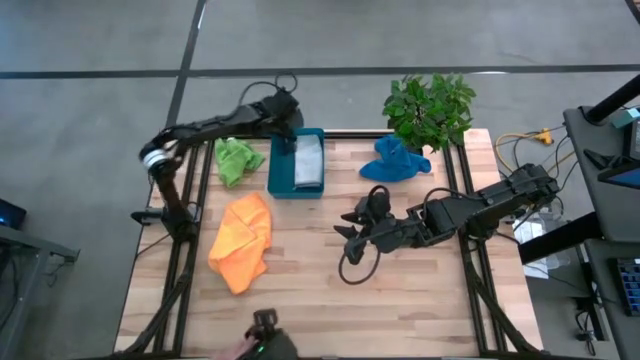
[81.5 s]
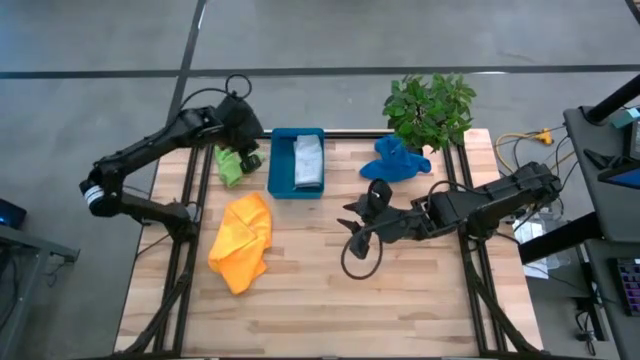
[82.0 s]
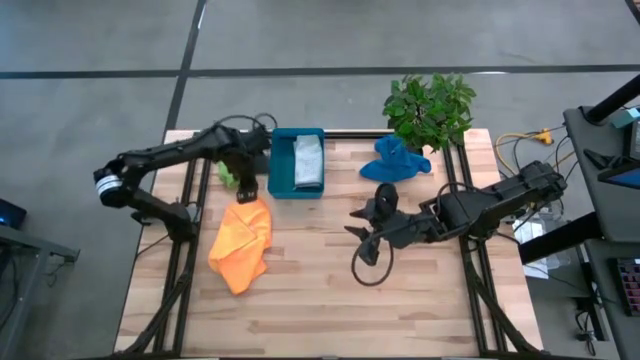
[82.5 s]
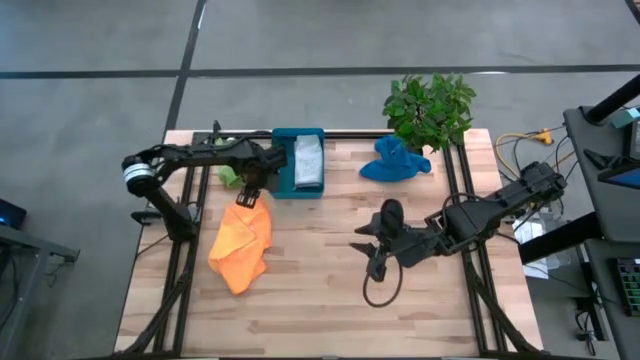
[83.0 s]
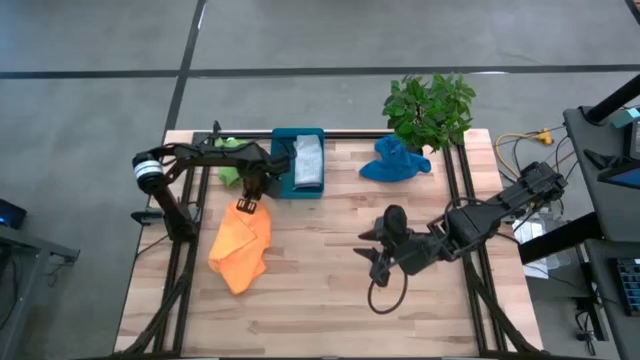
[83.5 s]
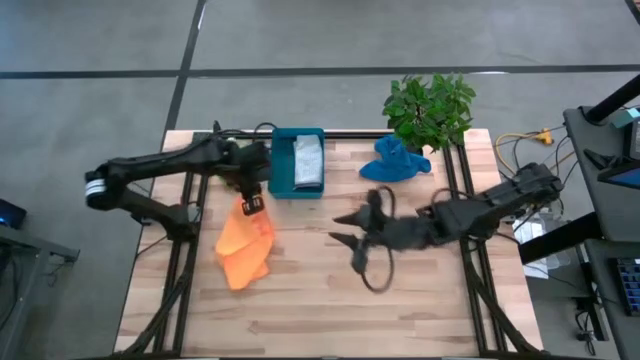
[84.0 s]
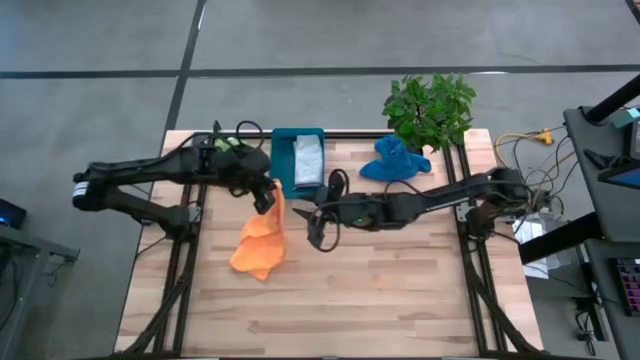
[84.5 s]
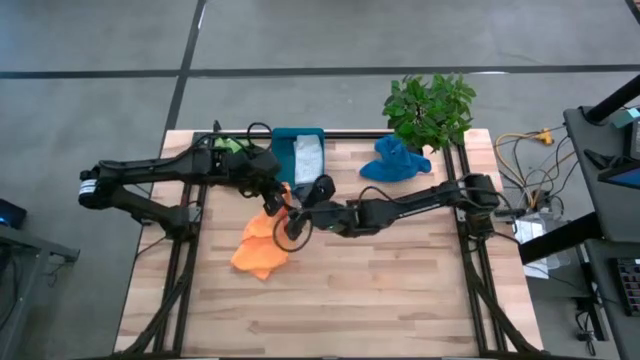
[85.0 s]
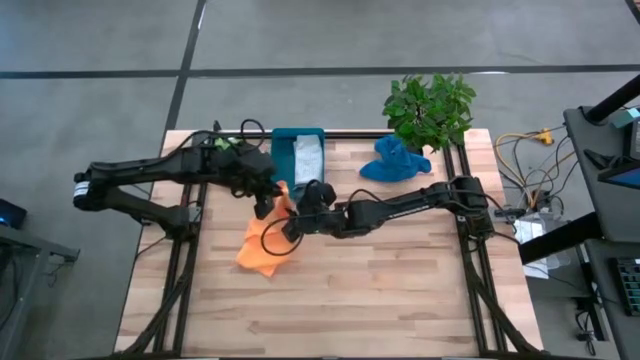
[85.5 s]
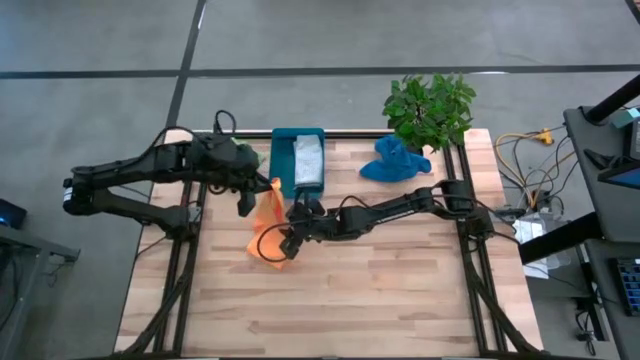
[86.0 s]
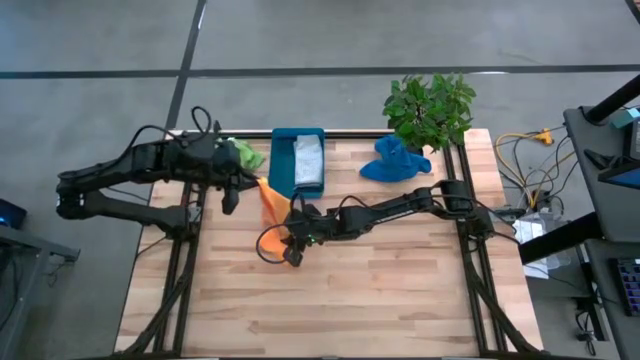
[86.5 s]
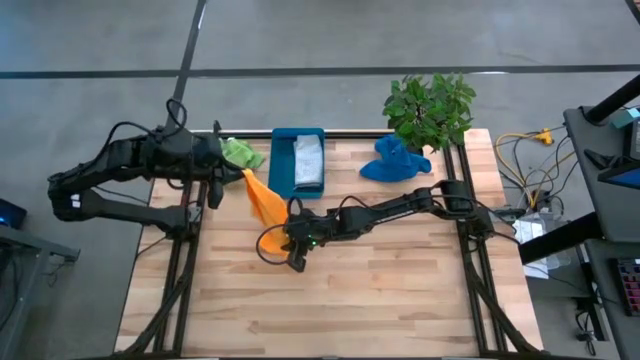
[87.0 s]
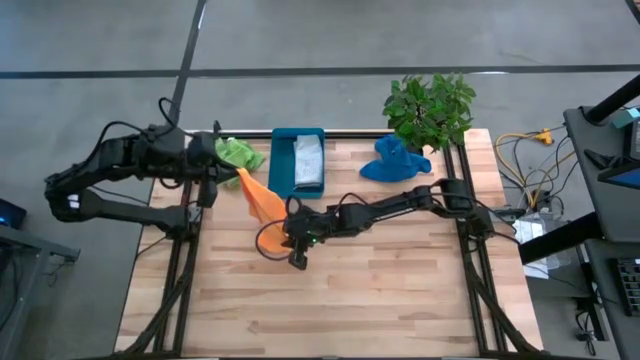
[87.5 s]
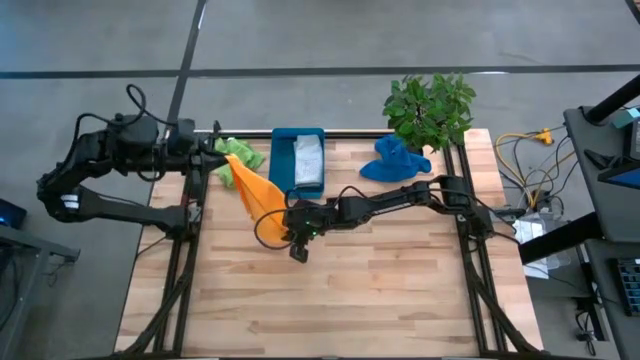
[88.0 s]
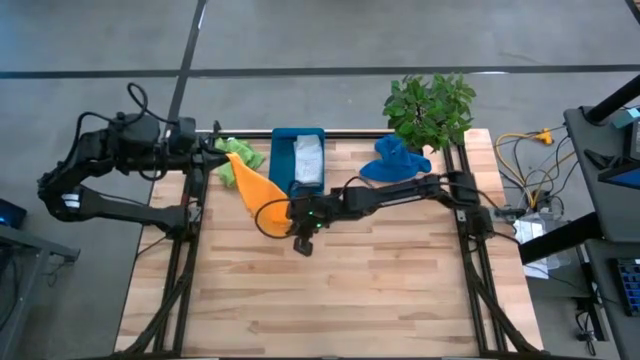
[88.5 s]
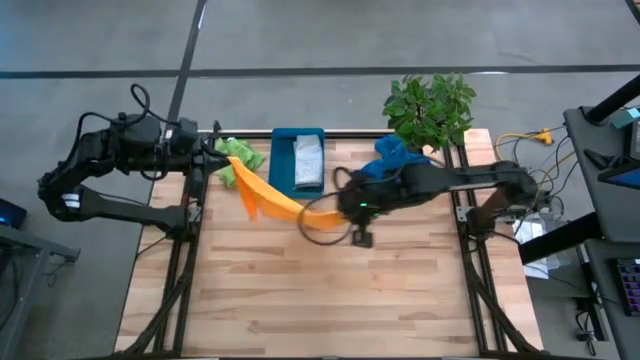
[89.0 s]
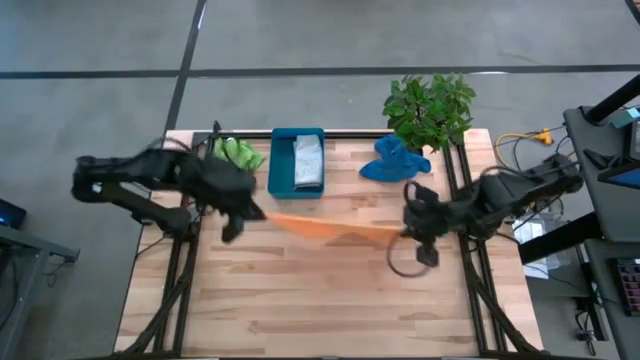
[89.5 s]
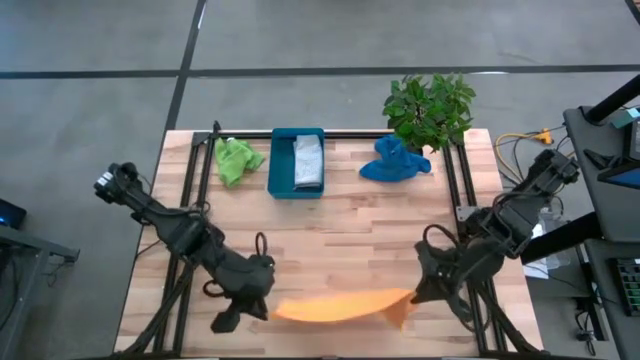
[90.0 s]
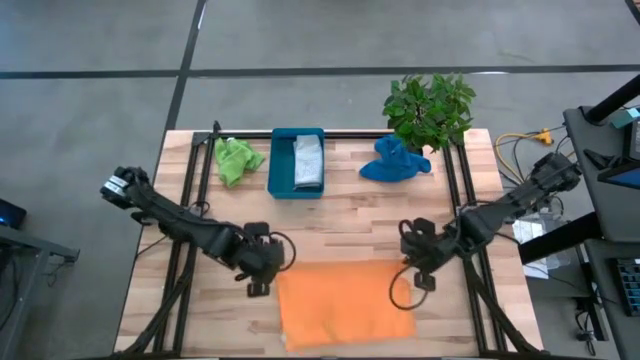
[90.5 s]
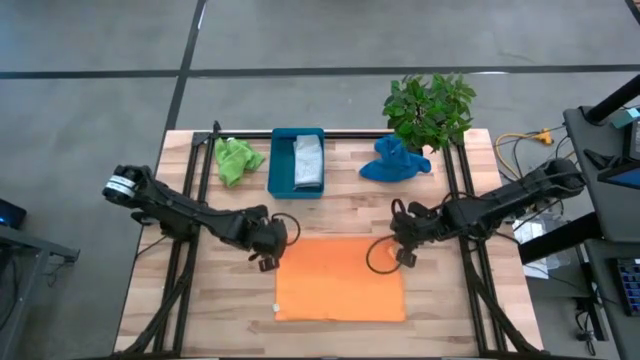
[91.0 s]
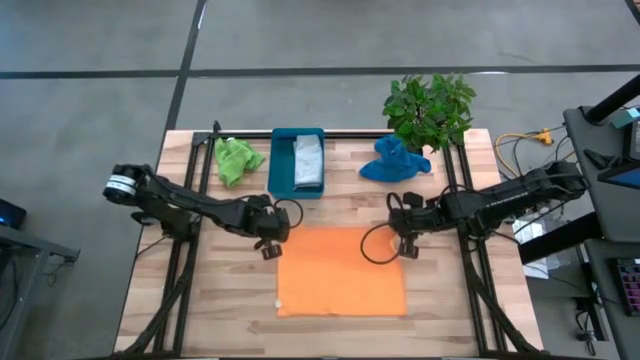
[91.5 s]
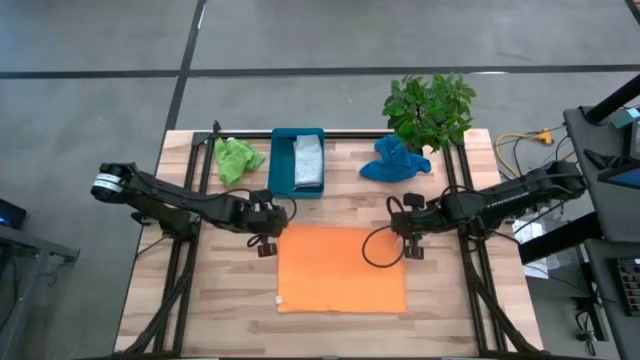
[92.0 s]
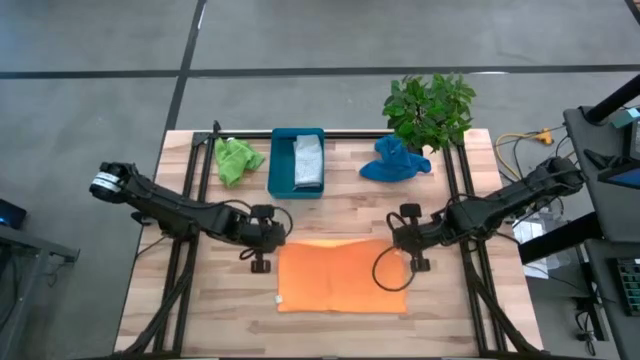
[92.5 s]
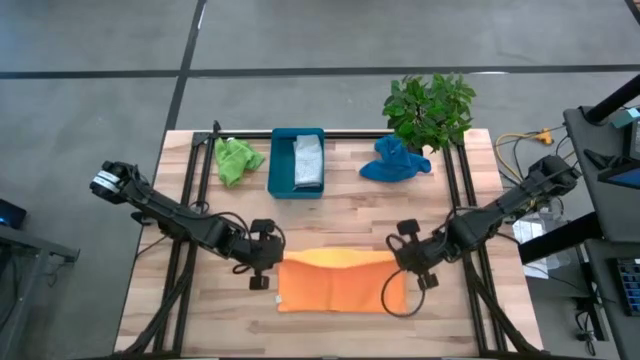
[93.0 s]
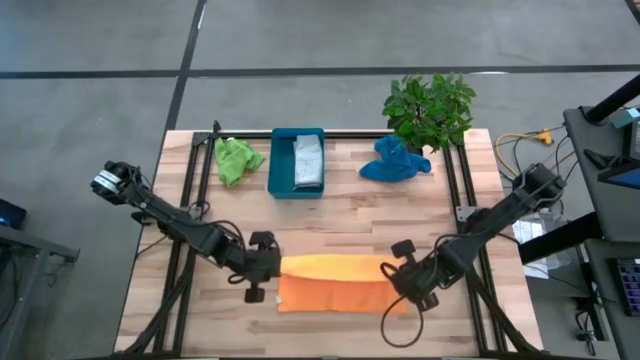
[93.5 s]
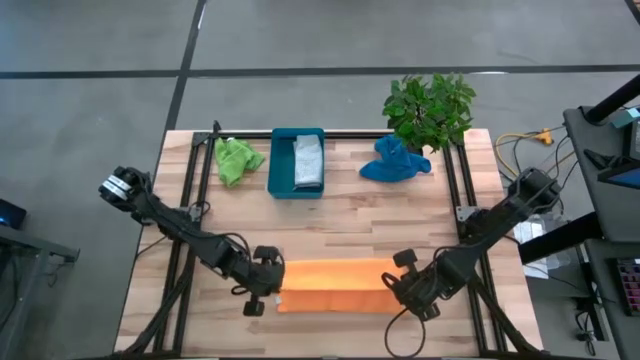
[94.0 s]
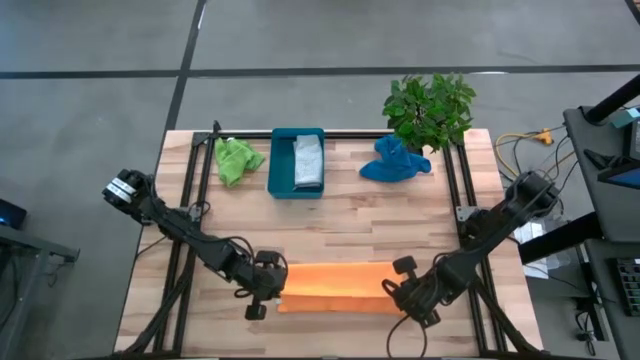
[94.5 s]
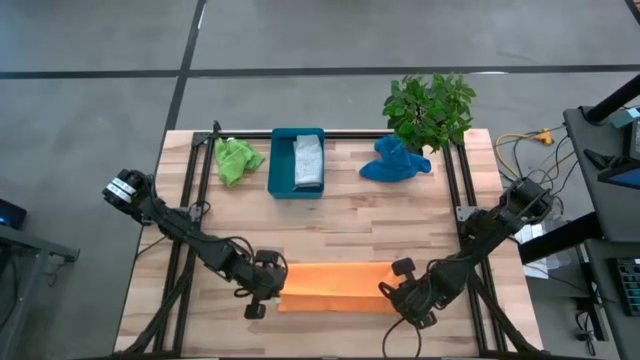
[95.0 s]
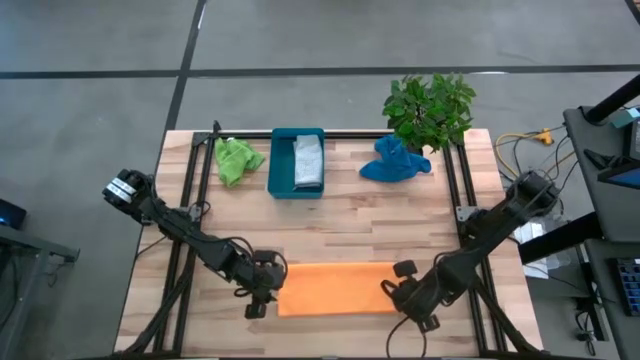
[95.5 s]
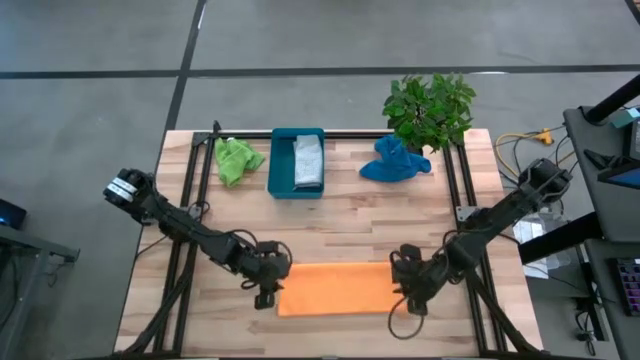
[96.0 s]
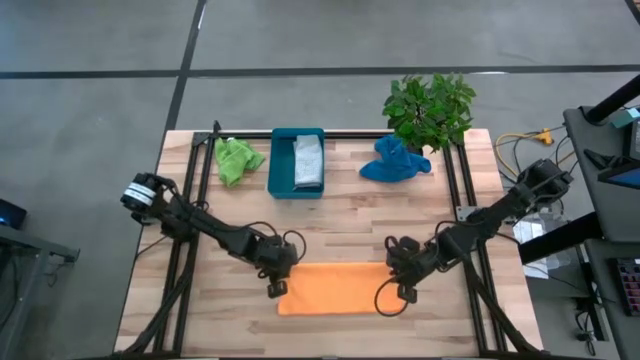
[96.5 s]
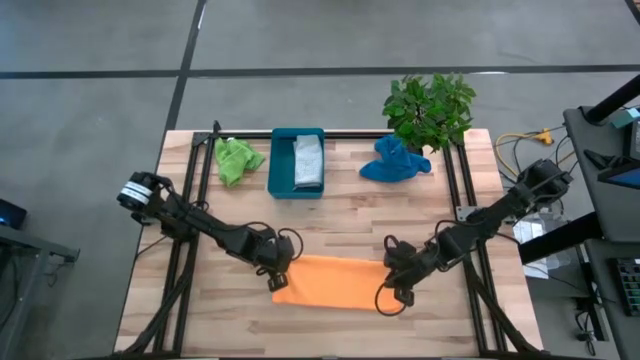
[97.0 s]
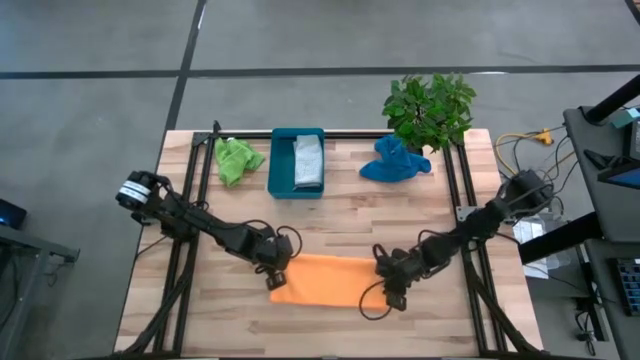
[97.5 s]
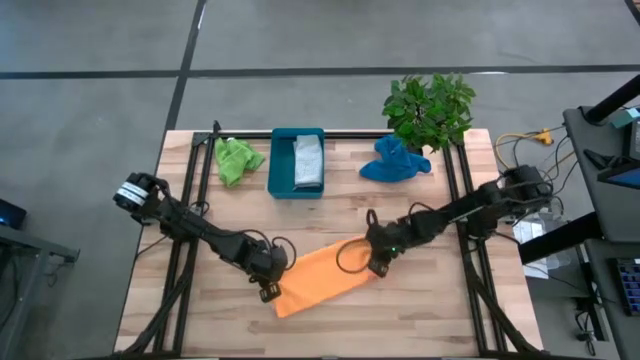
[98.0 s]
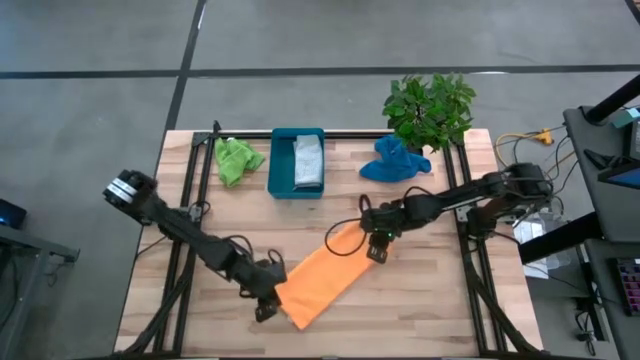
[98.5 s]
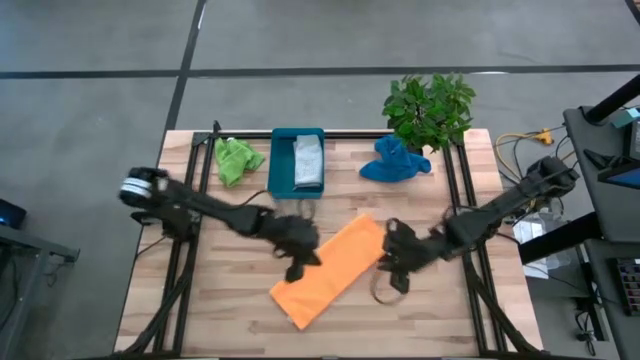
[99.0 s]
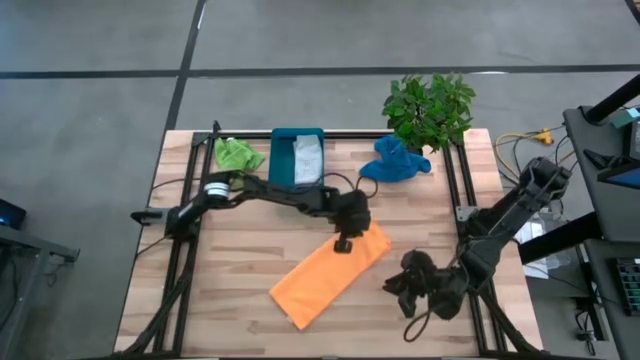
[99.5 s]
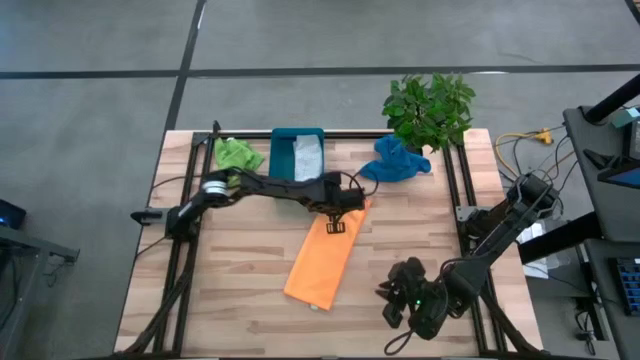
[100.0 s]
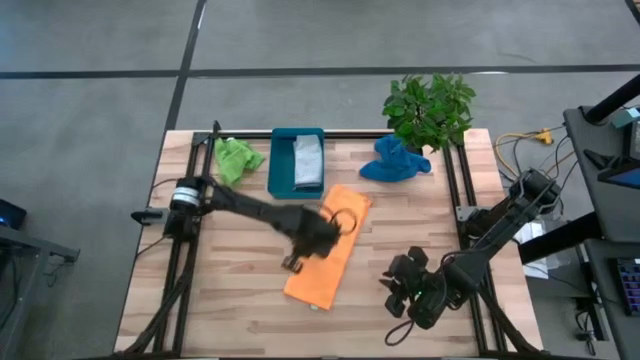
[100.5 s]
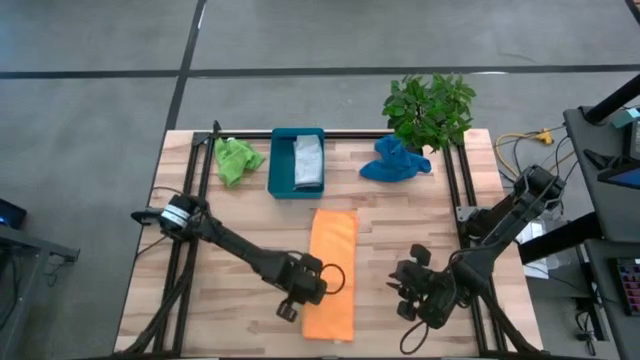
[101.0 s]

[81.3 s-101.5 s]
Task: Fold microfiber towels
Fold the orange microfiber cloth

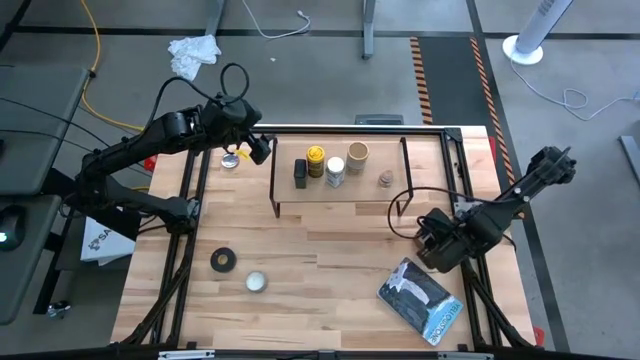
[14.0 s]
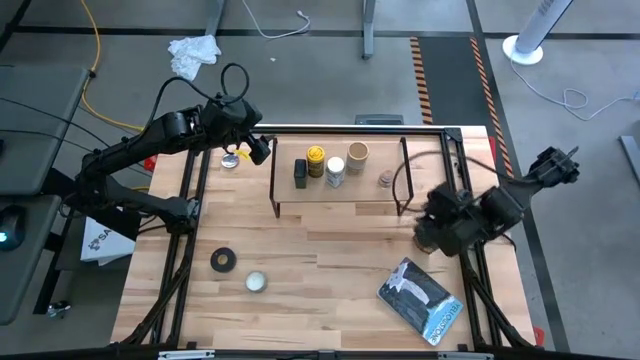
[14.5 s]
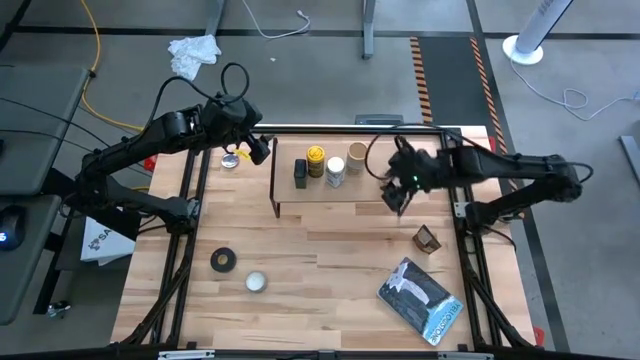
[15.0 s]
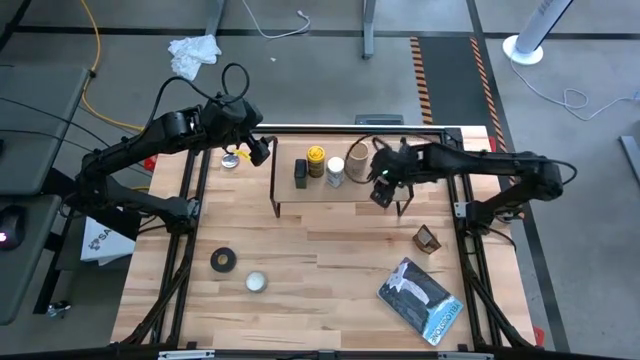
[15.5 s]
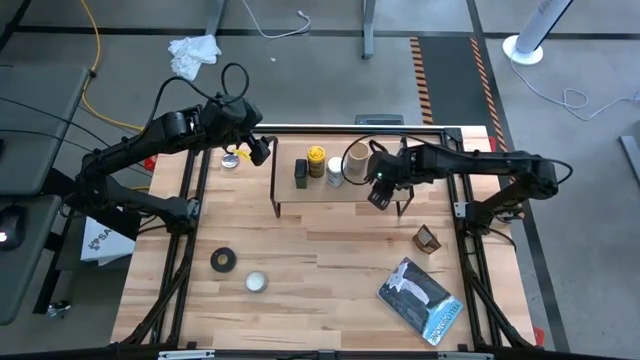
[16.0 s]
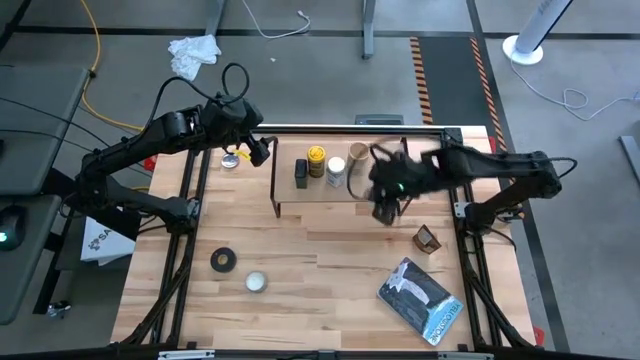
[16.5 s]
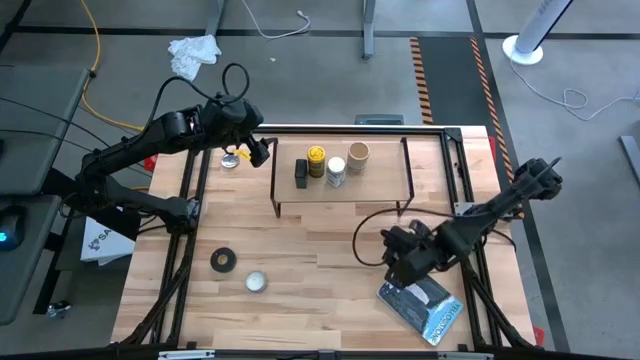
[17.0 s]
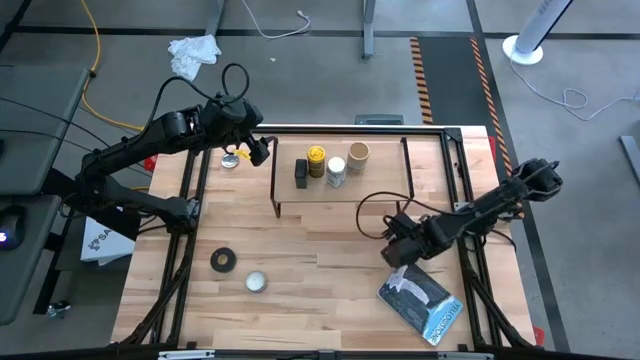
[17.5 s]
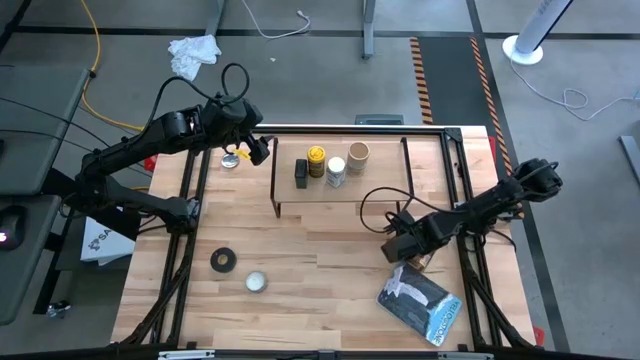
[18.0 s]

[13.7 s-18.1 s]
Task: Shelf spices
Remove the brown seasoning bottle from the shelf
